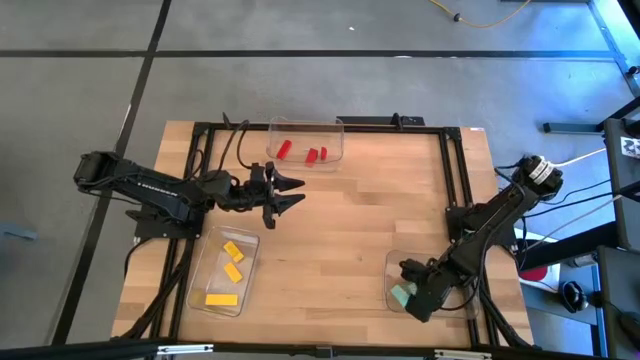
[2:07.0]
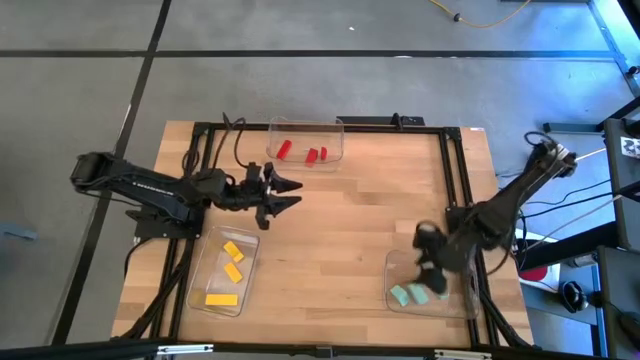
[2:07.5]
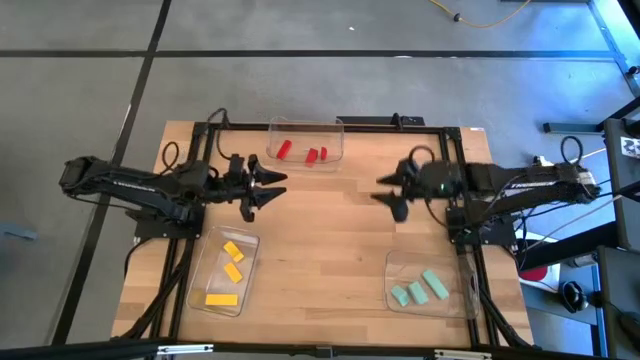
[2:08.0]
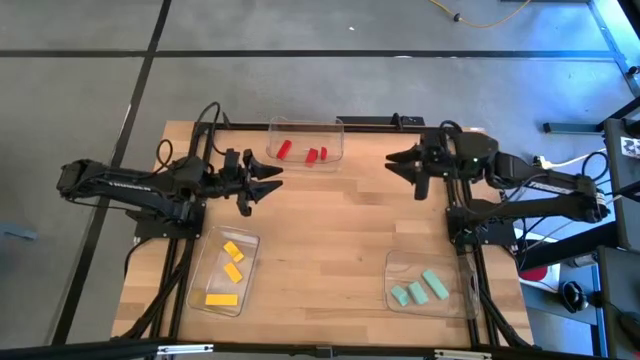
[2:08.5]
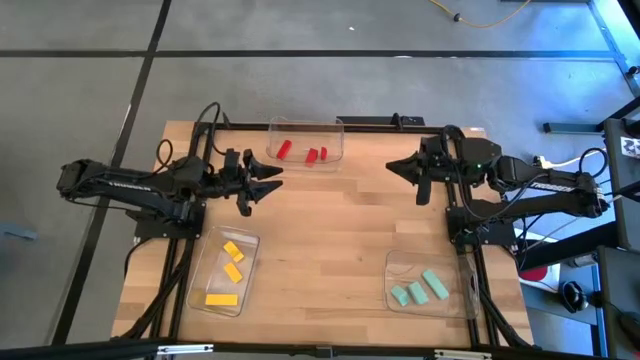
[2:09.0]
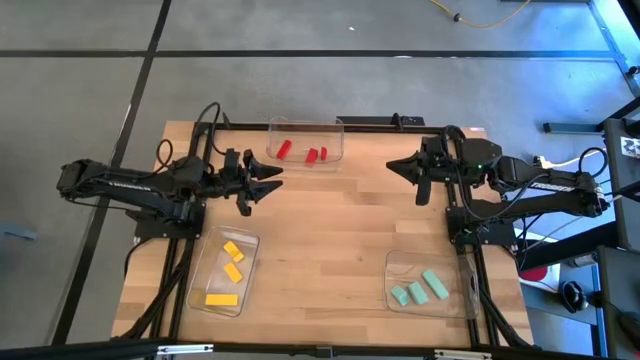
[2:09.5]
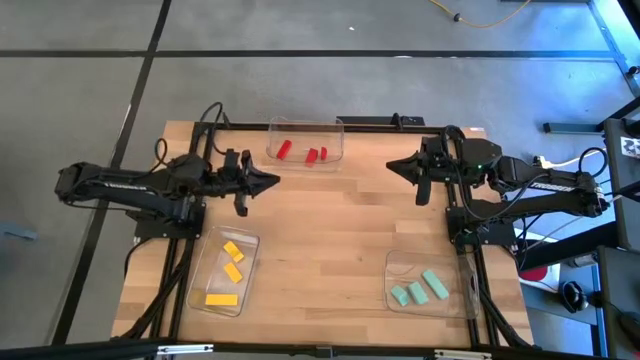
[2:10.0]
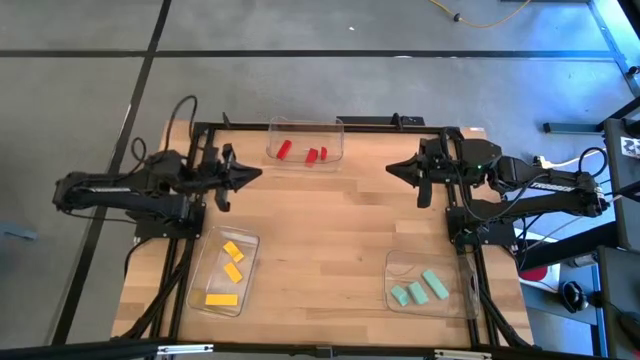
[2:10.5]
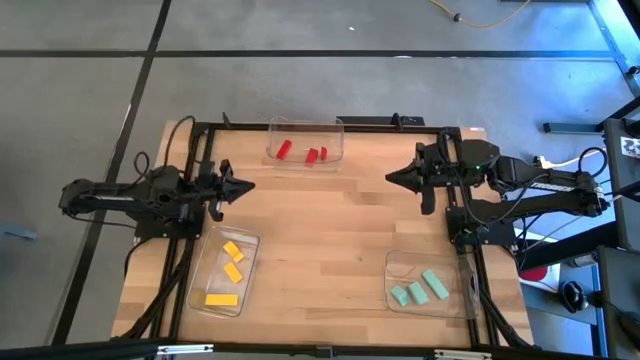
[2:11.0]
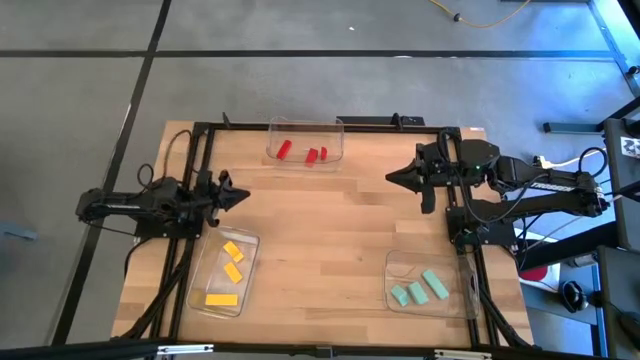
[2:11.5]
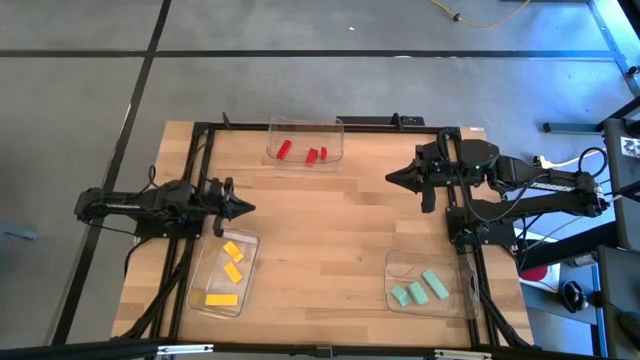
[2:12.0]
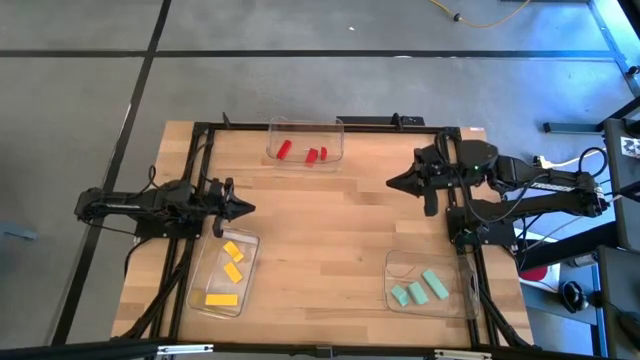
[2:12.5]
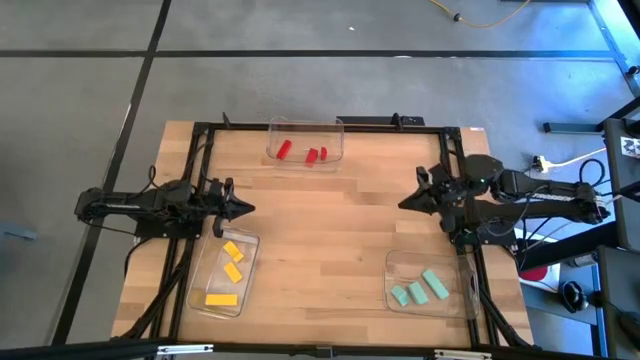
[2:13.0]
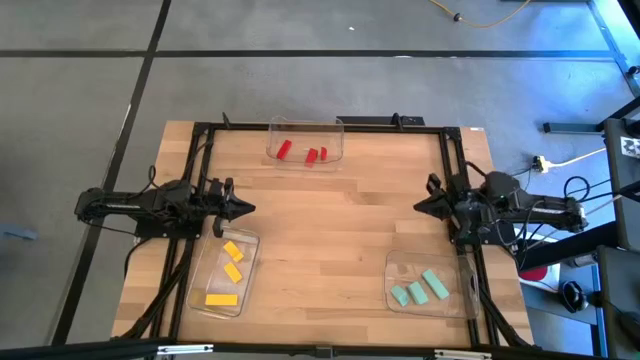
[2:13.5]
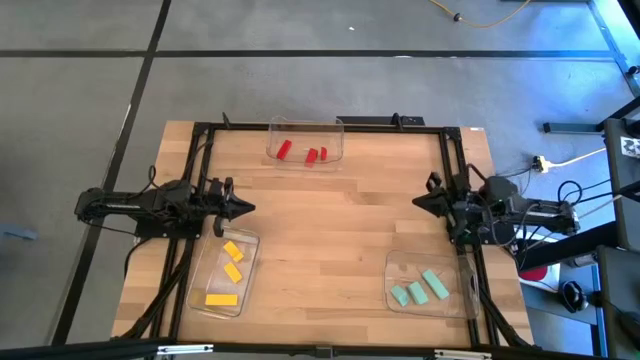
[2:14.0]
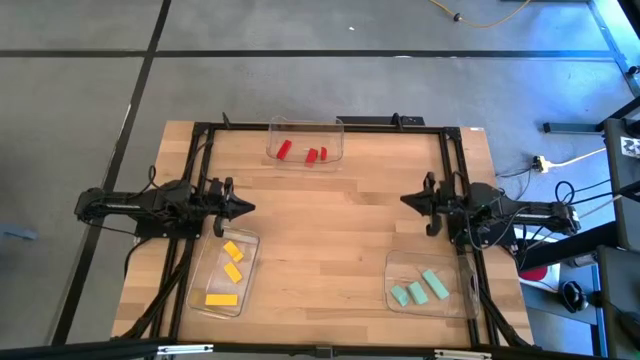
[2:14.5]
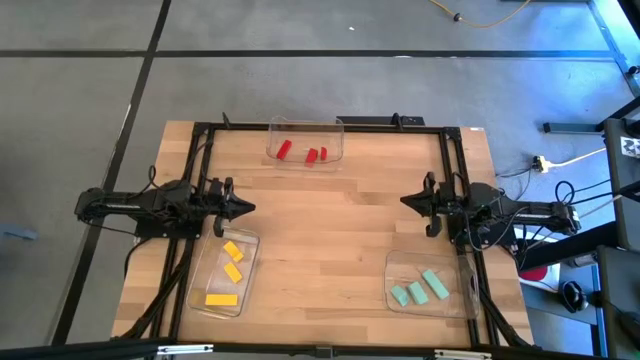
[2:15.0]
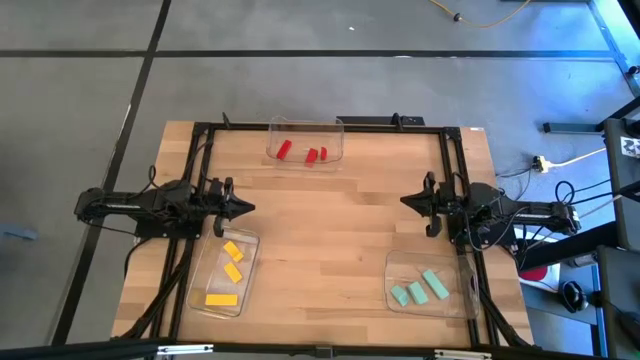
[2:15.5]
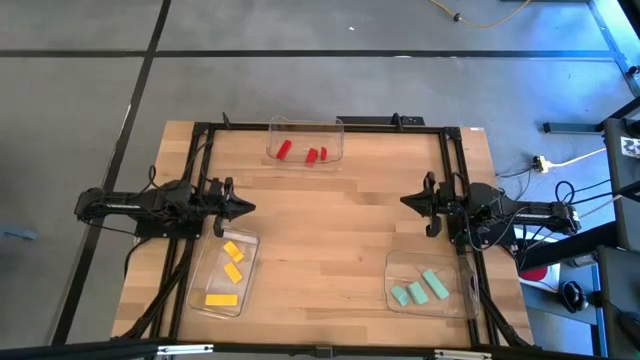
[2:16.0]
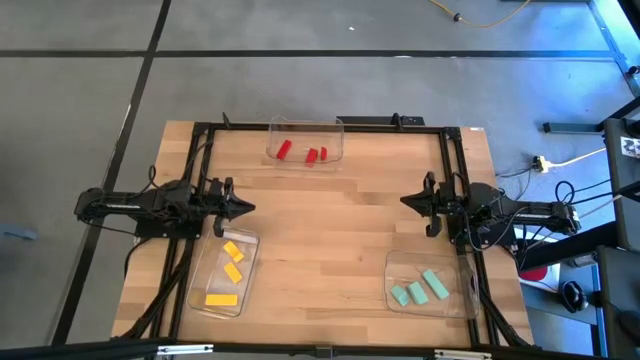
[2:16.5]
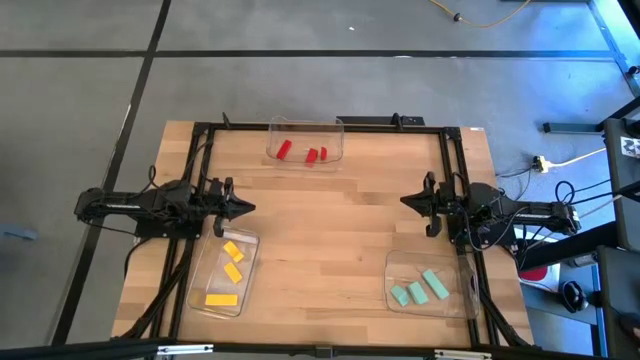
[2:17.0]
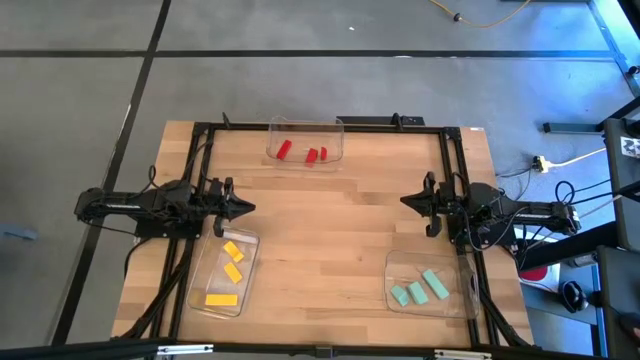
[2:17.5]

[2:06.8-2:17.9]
Task: Sort & place blocks by color
Return to Home Position

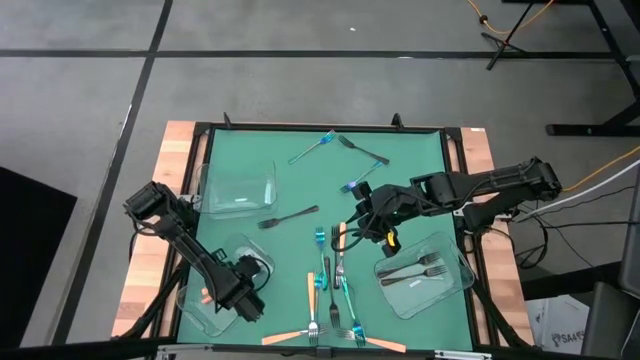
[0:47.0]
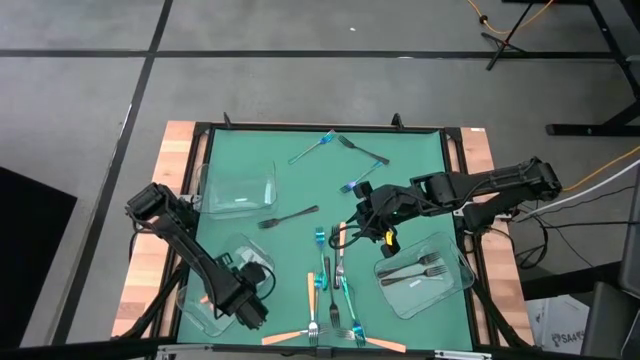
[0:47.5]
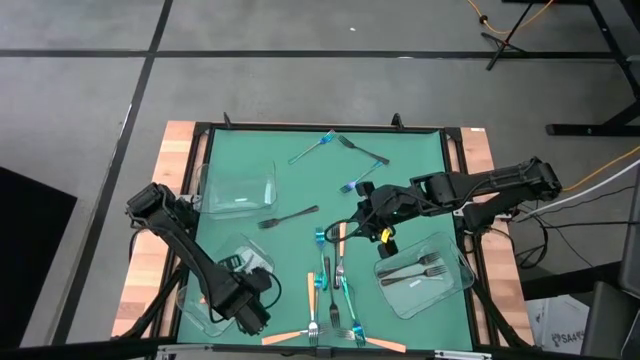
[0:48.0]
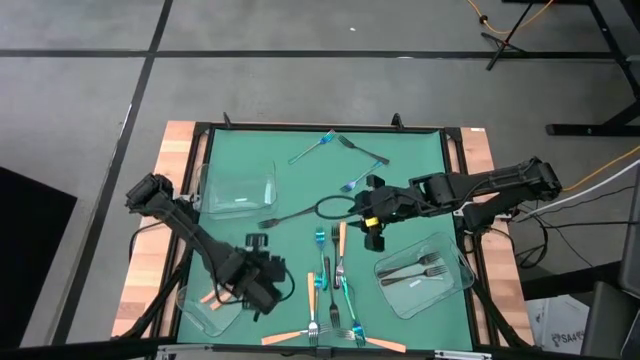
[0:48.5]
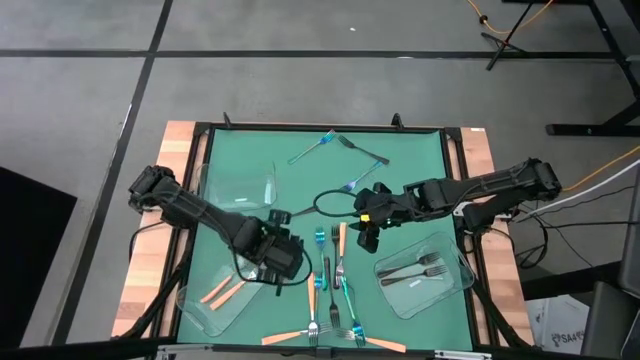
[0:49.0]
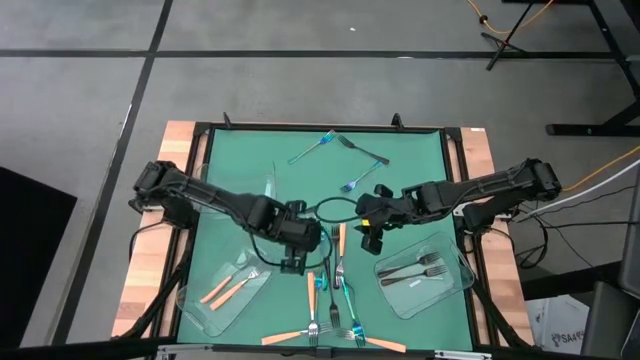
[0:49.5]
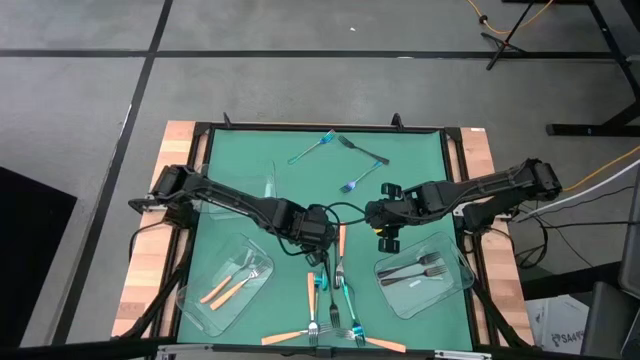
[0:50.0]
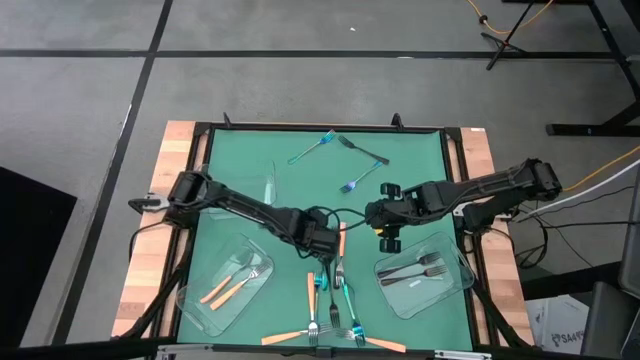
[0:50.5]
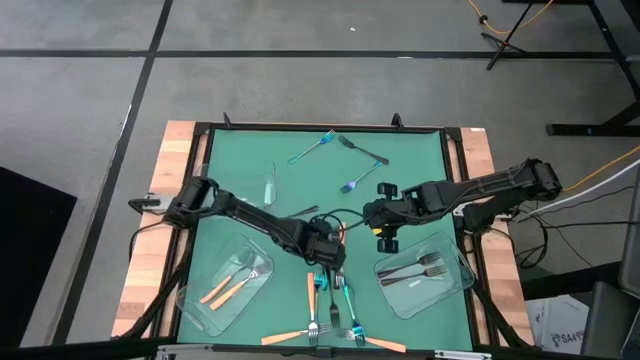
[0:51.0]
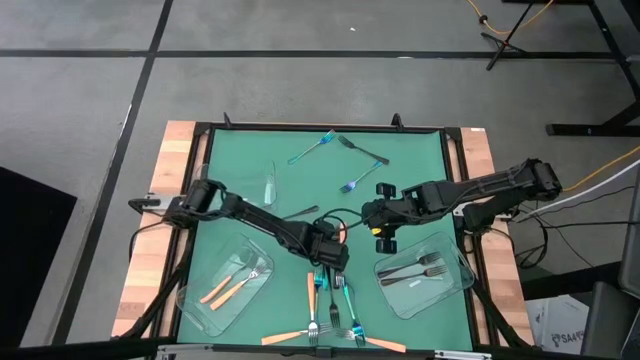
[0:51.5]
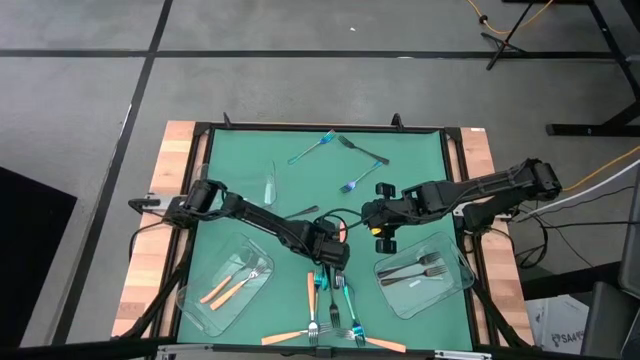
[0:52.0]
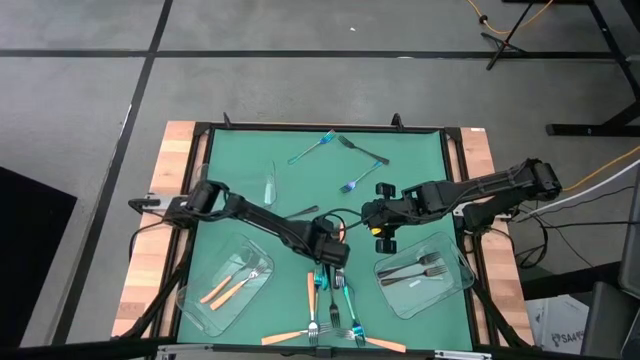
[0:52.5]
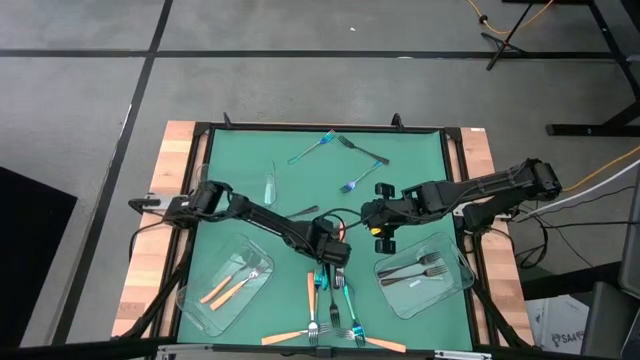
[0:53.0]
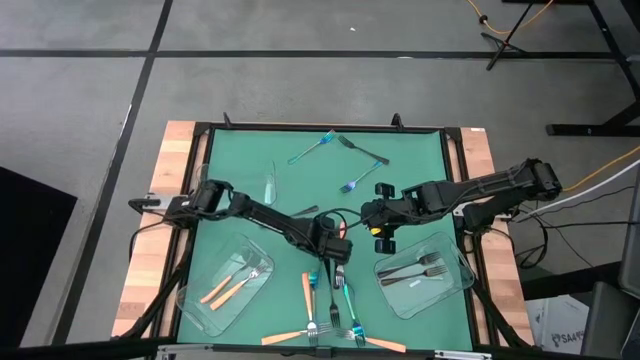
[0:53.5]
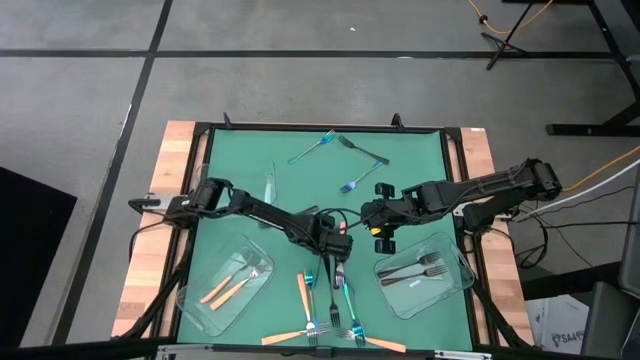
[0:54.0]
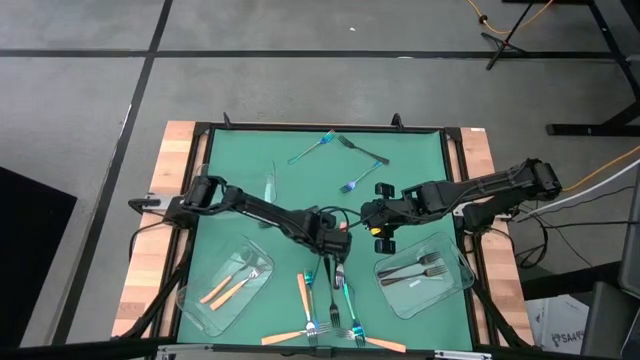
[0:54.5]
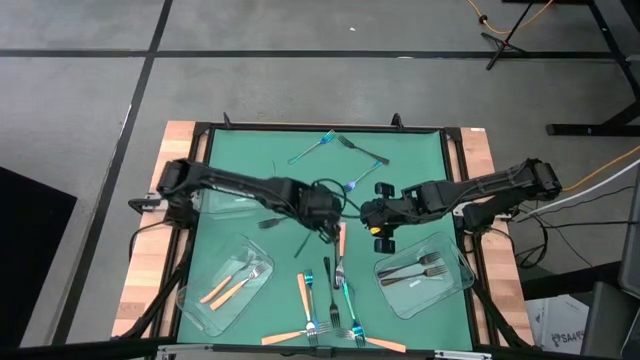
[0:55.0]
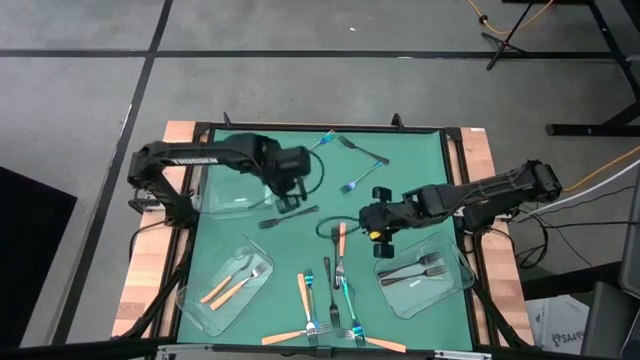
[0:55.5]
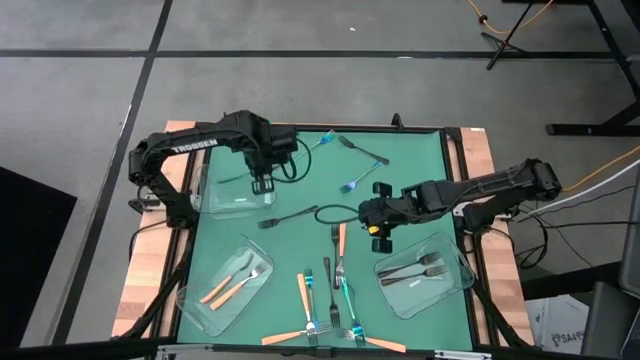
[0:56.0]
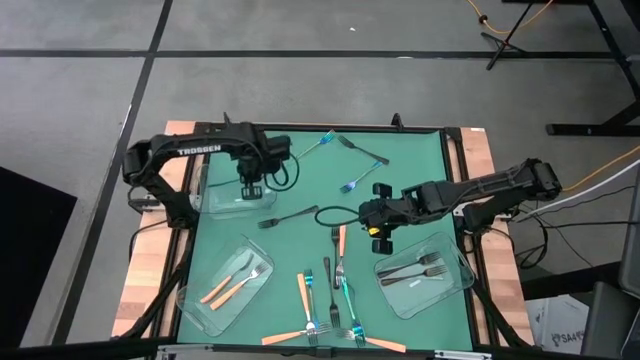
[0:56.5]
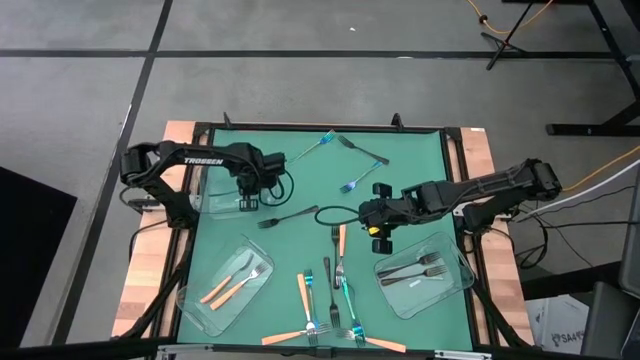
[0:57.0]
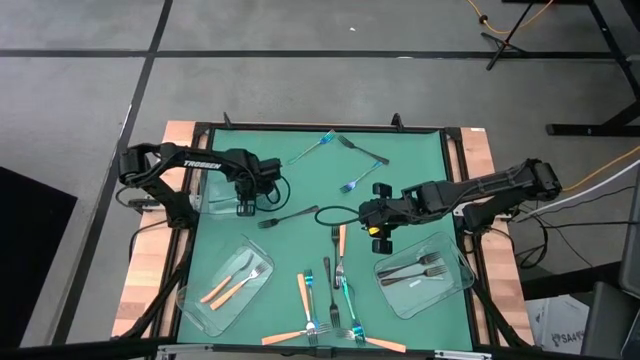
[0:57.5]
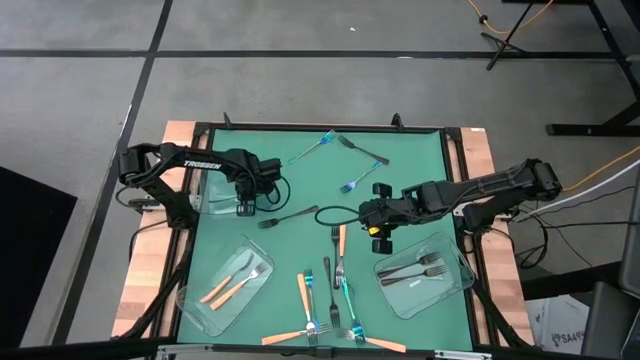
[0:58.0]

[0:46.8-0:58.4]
Task: Sort silverware by color (type)
Put the blue fork into the top transparent bin
